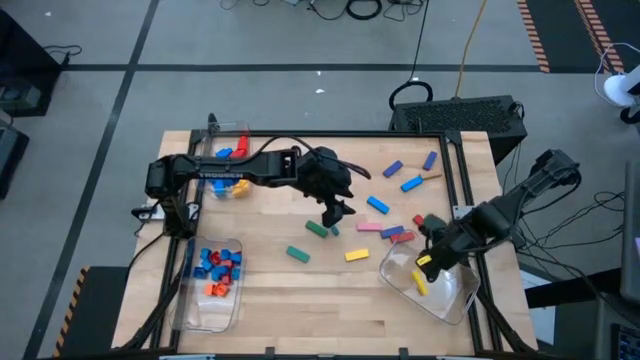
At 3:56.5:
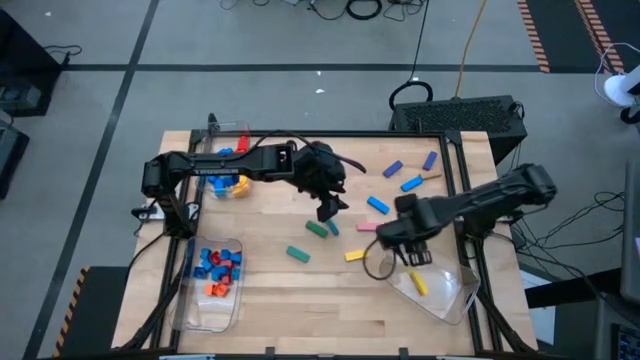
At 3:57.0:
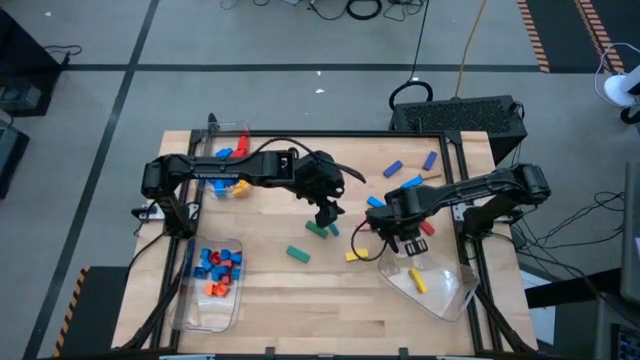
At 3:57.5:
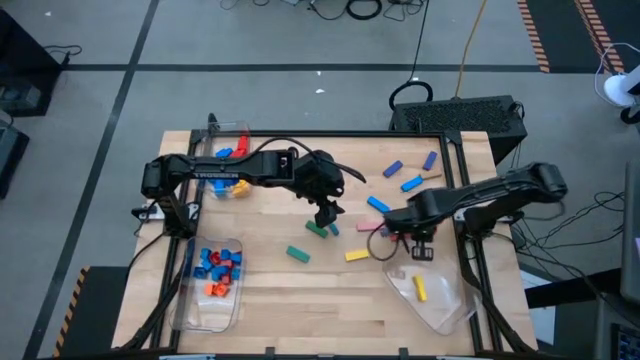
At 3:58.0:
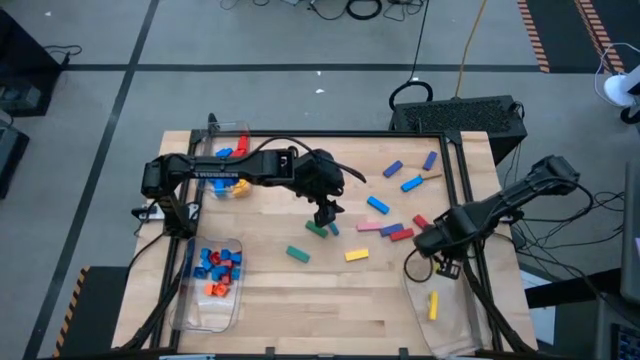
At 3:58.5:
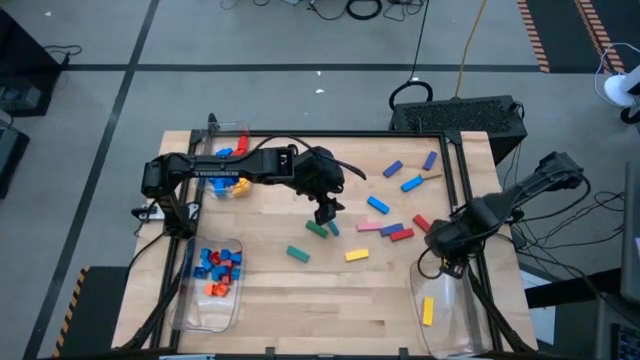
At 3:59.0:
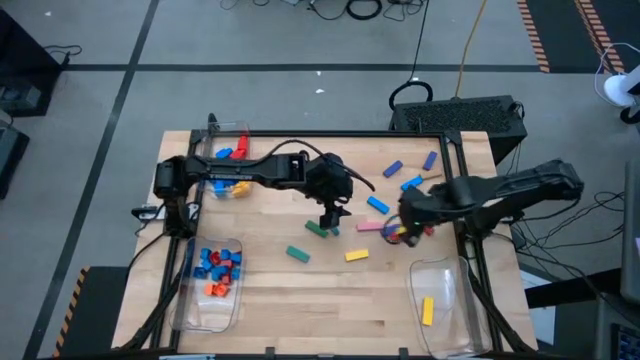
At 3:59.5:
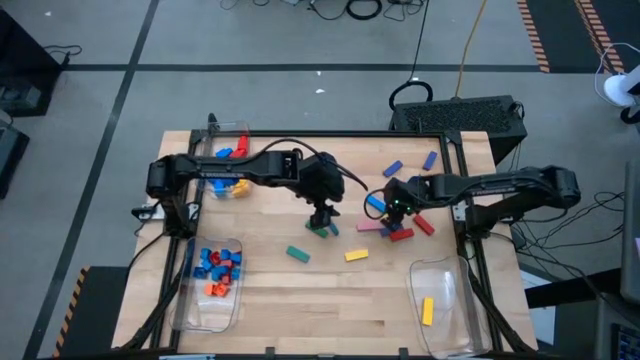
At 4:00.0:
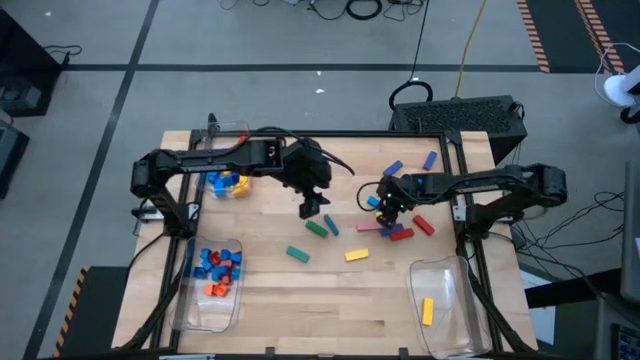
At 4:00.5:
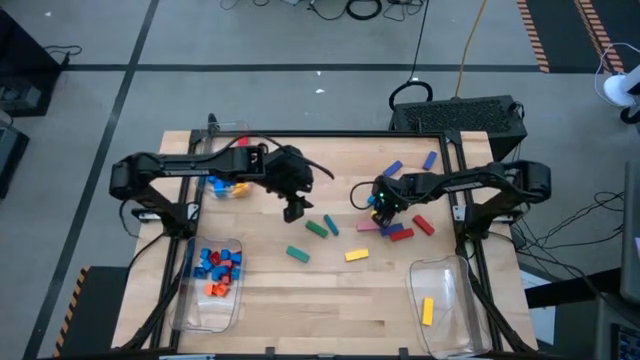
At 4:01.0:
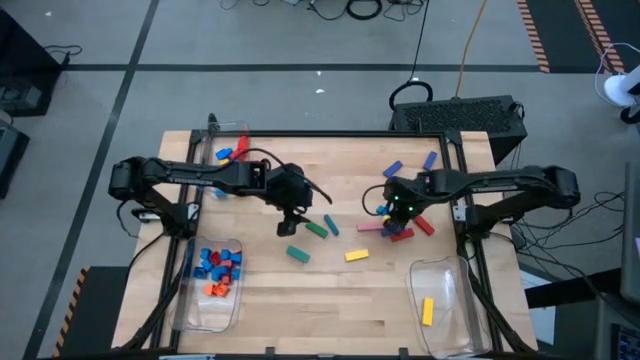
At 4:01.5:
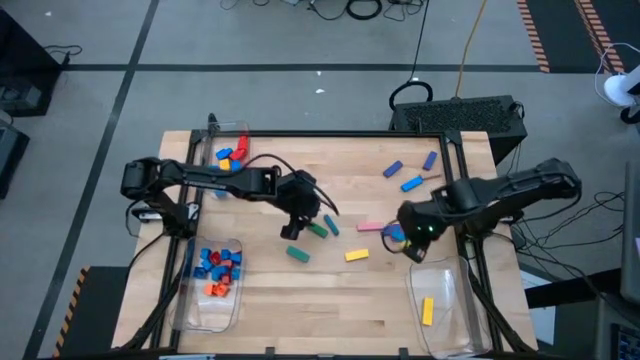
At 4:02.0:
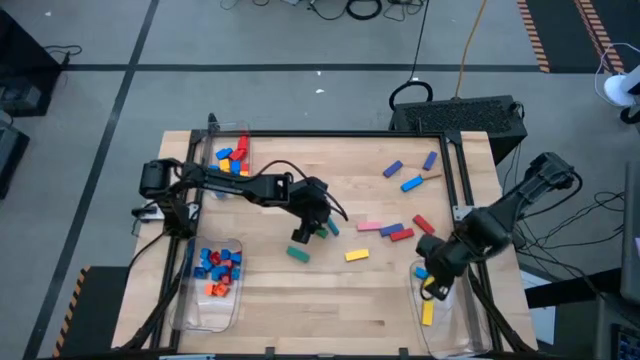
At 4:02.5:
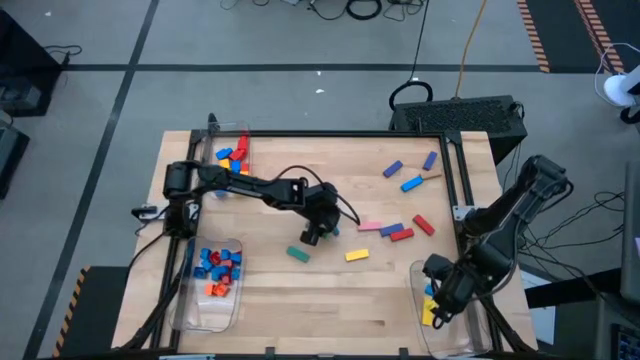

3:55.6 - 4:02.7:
Task: Sort blocks by size
Put the blue rectangular block into the bottom right transparent bin

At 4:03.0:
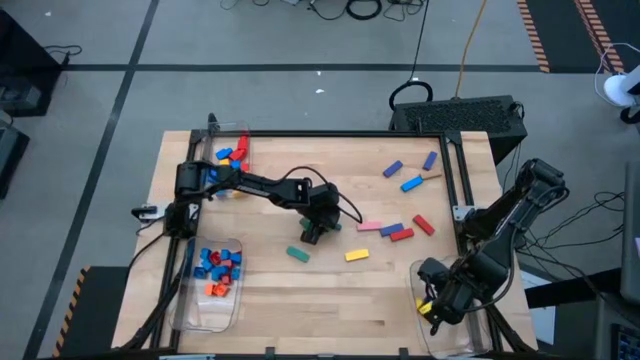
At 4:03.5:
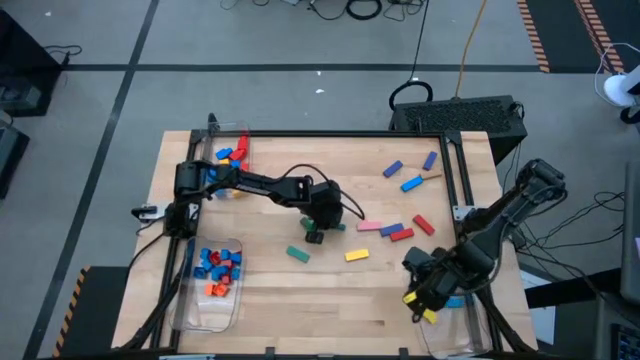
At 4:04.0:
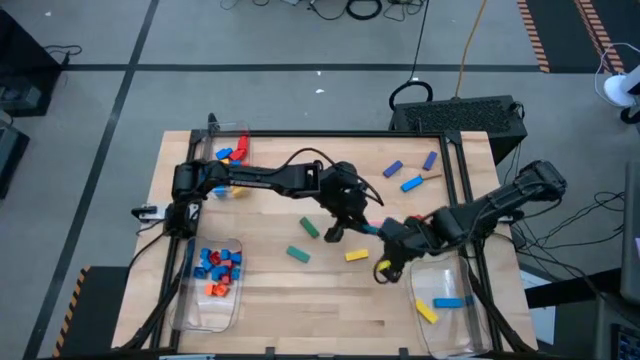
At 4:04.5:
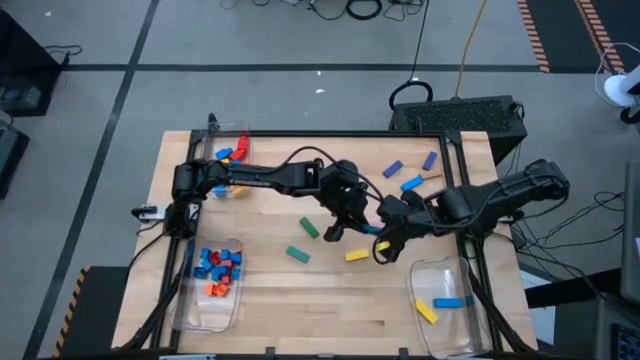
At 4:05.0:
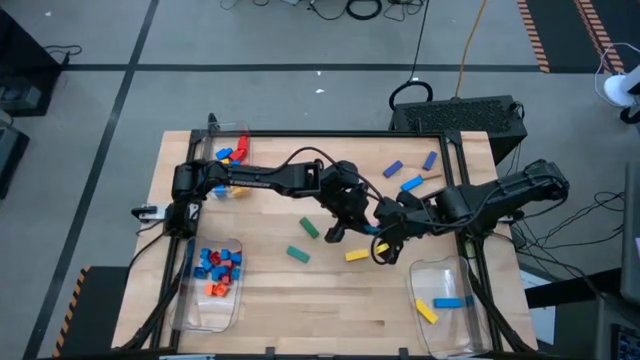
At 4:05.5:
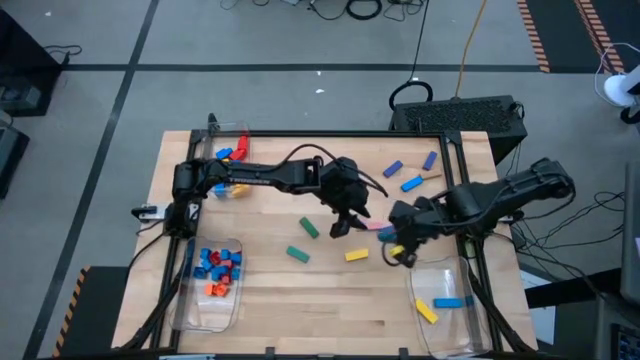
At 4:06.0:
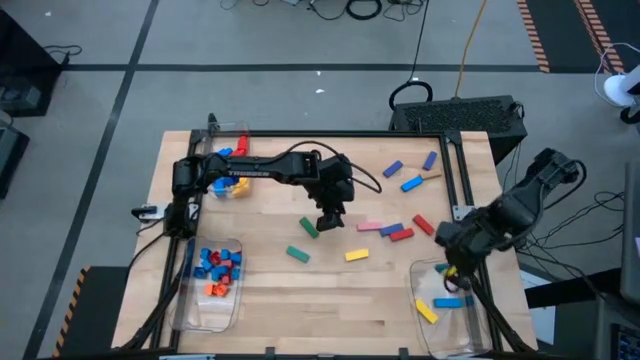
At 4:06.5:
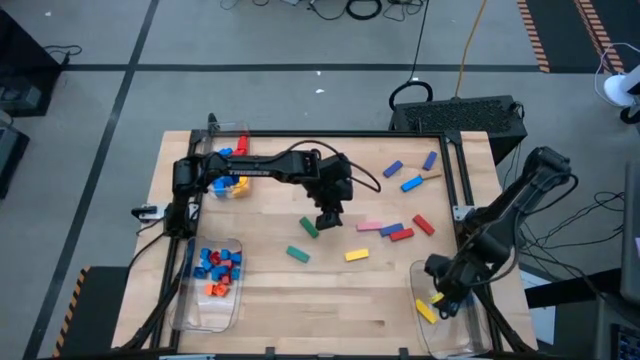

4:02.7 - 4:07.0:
Put the blue rectangular block into the bottom right transparent bin

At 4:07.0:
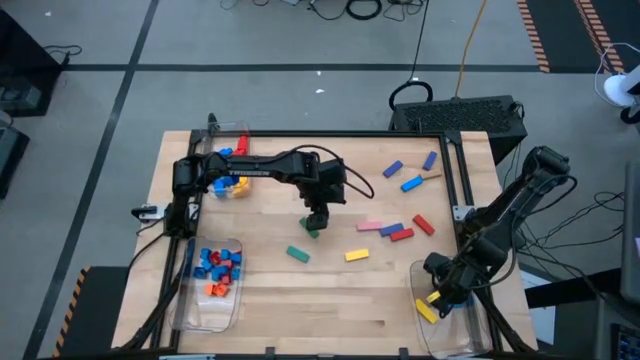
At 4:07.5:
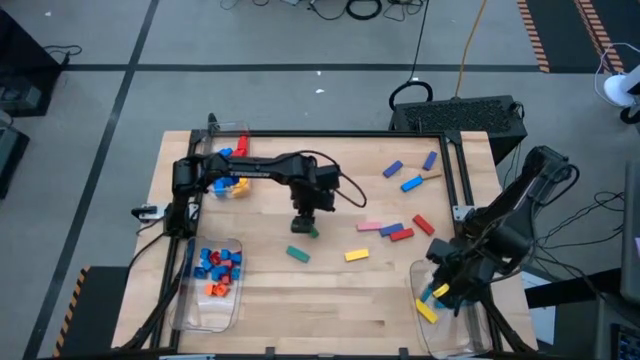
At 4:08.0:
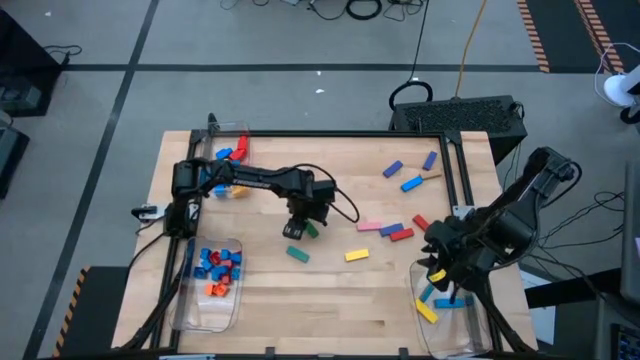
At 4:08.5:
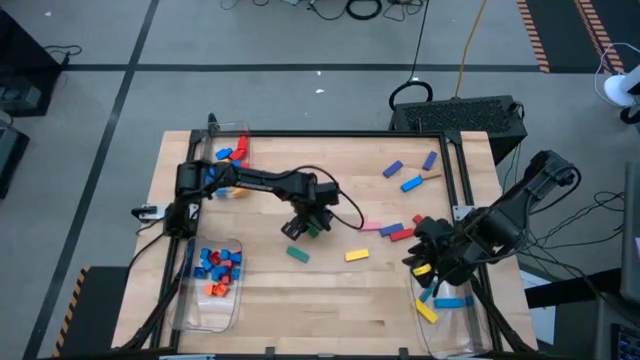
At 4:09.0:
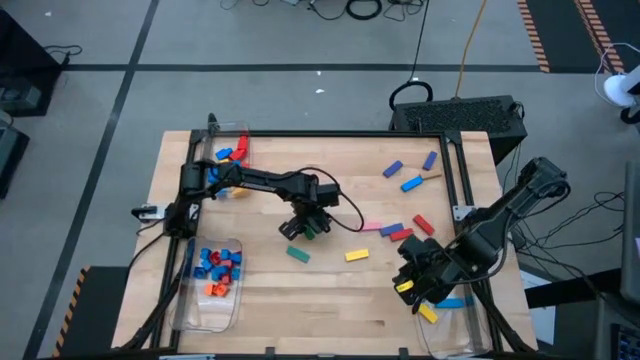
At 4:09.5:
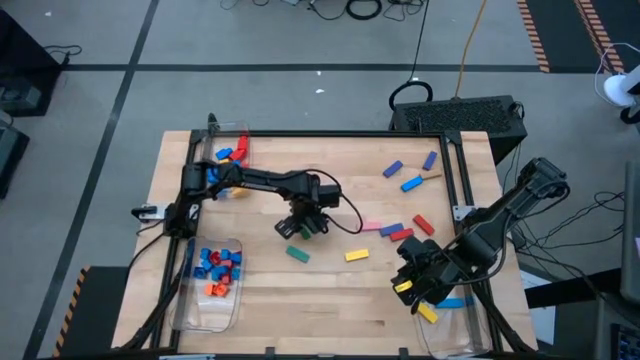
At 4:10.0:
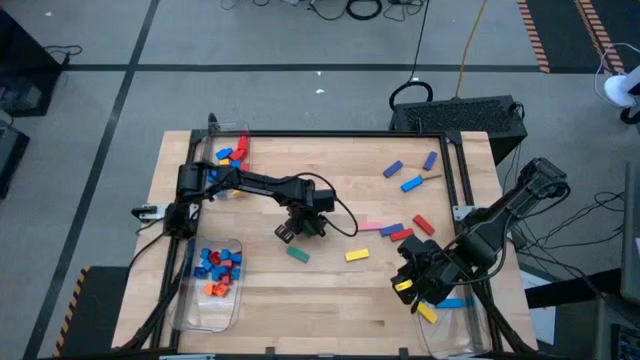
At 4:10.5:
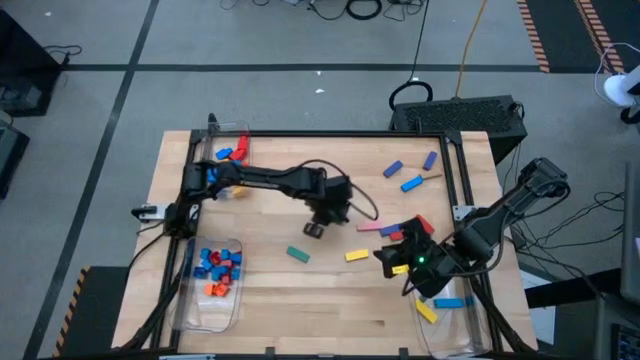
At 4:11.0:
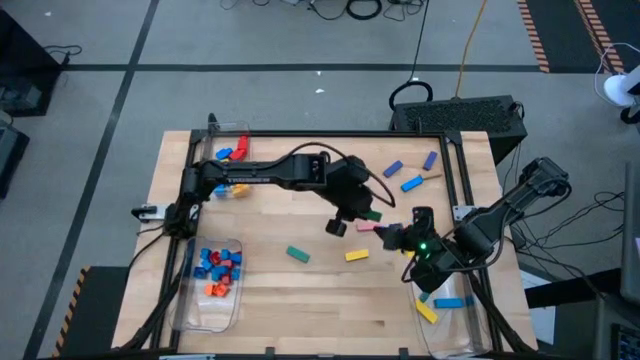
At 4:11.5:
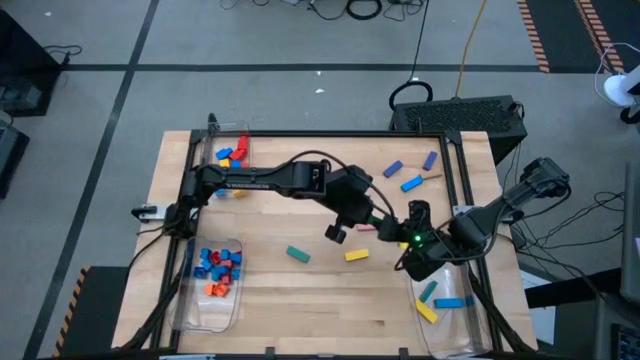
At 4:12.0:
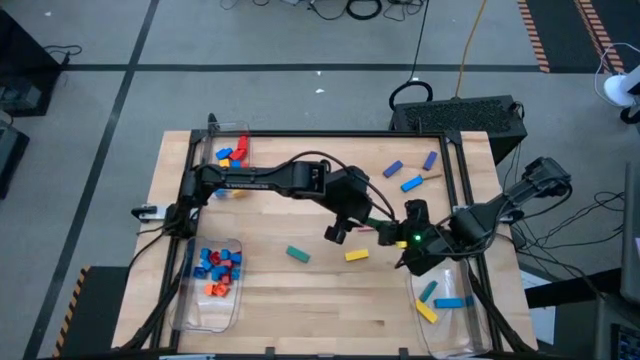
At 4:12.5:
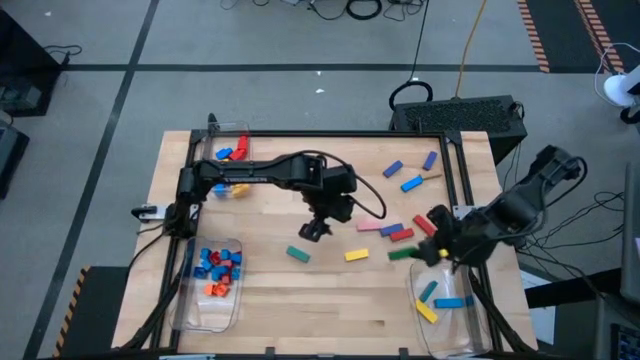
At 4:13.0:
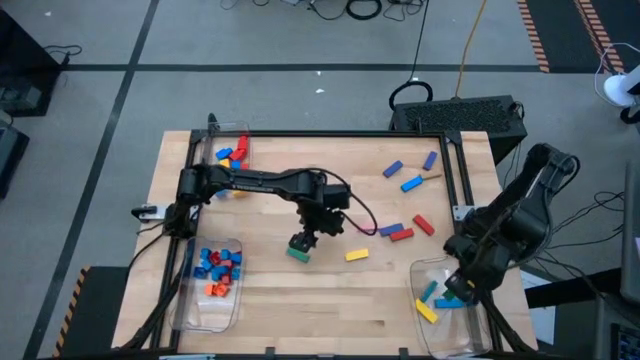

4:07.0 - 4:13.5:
Put the green rectangular block into the bottom right transparent bin

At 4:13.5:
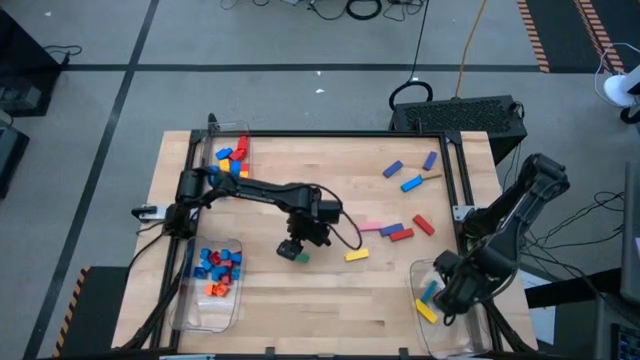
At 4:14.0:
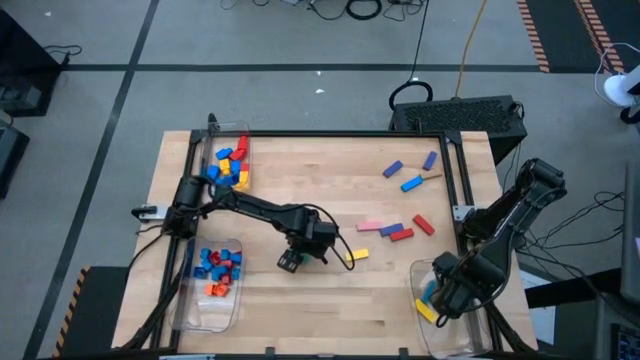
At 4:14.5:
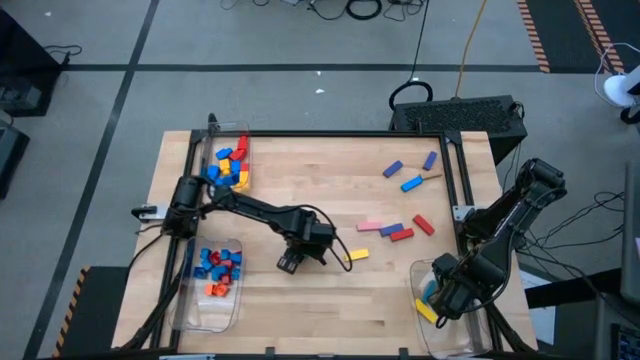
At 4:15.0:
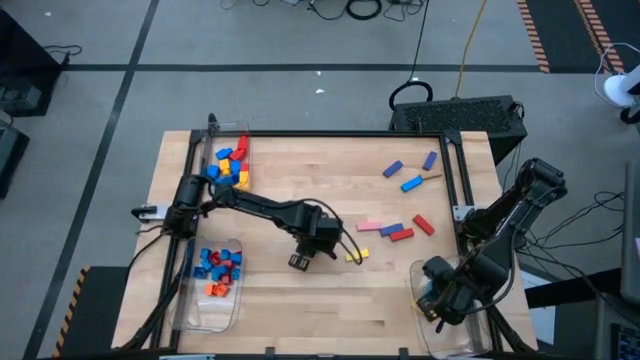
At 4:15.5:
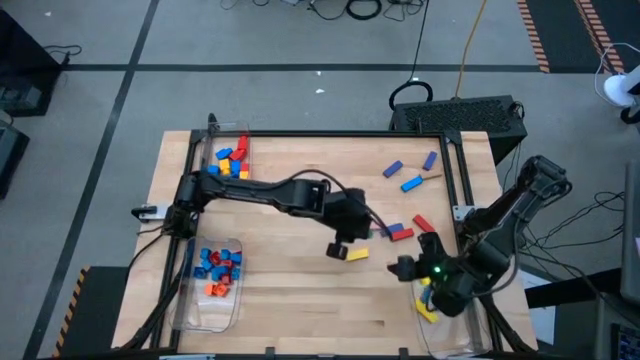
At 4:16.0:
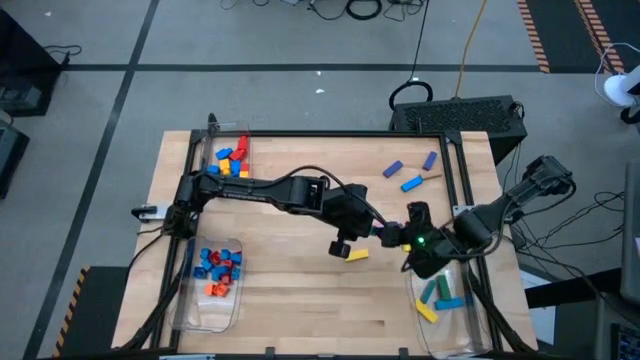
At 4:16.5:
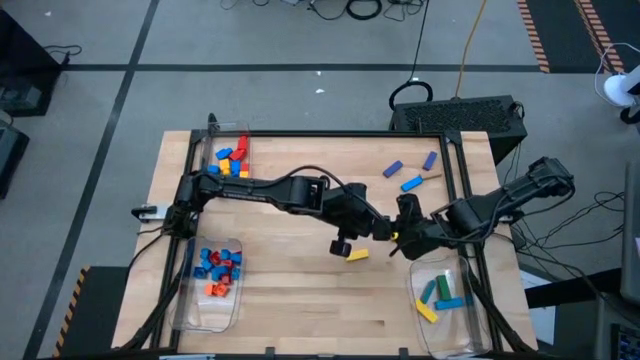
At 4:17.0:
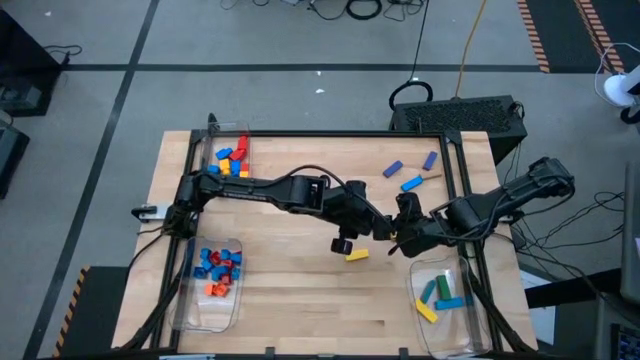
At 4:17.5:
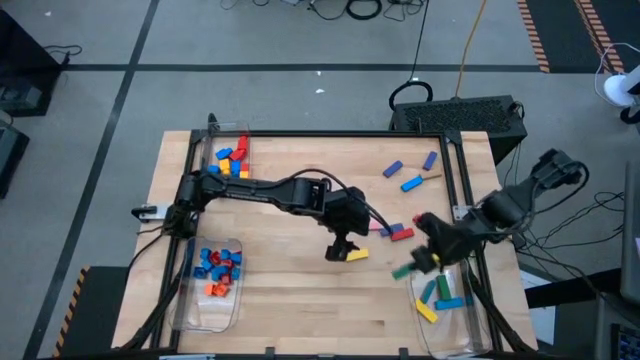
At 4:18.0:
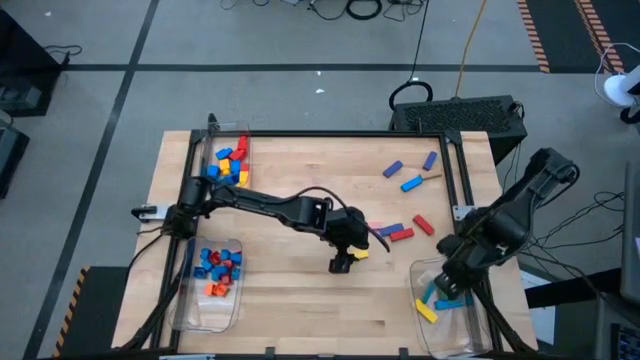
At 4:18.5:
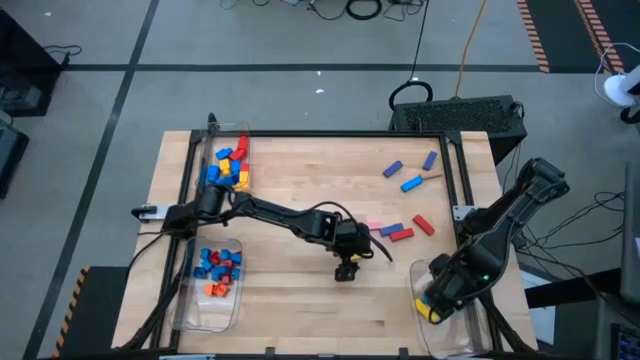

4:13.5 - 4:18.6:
Put the green rectangular block into the bottom right transparent bin
